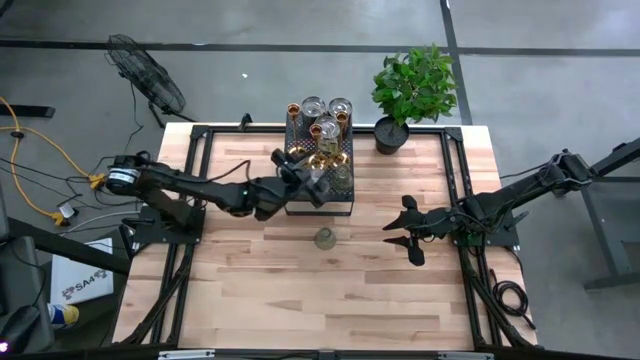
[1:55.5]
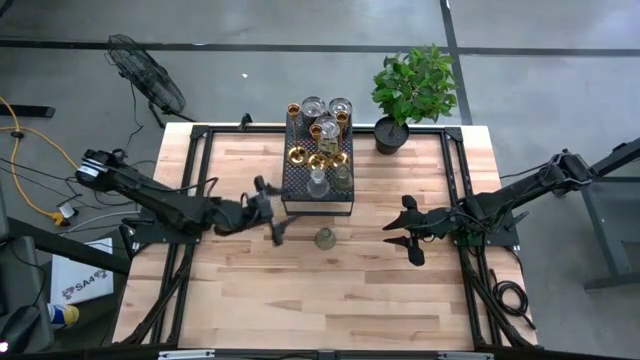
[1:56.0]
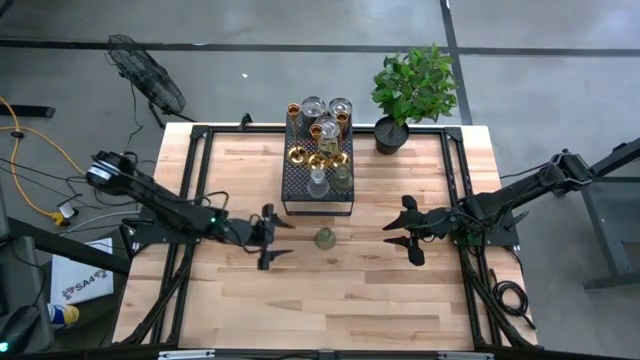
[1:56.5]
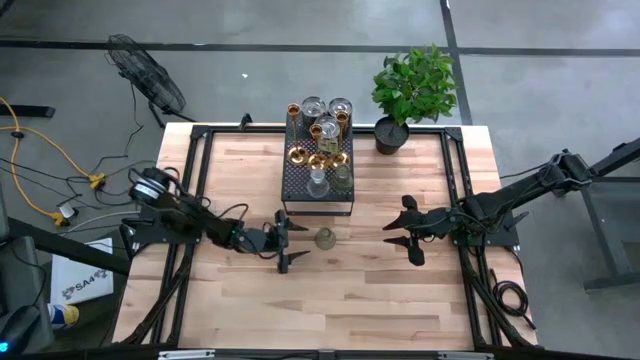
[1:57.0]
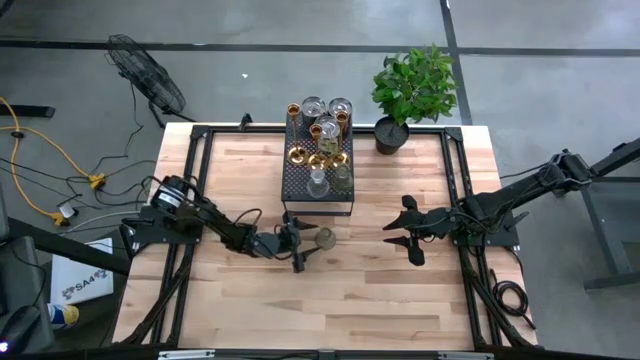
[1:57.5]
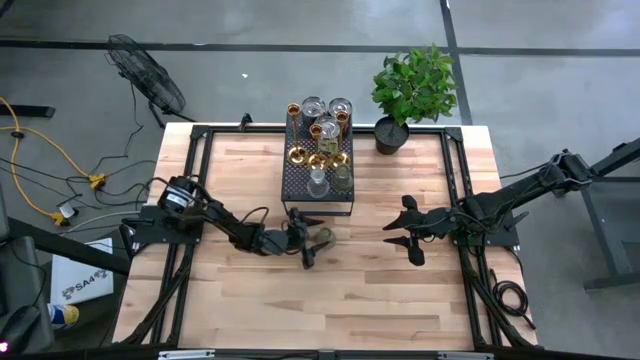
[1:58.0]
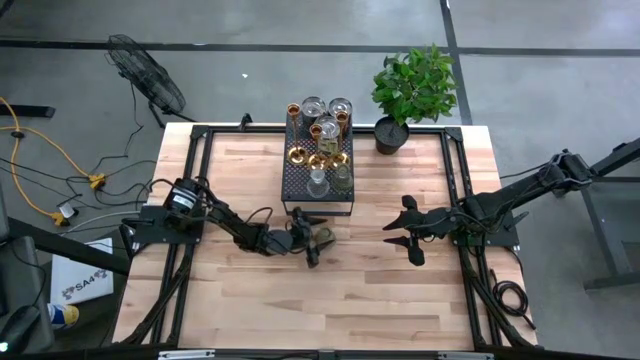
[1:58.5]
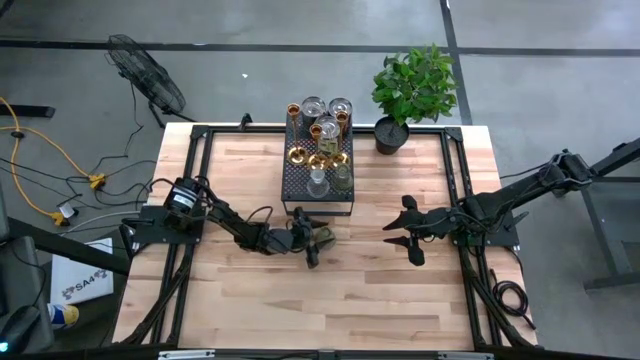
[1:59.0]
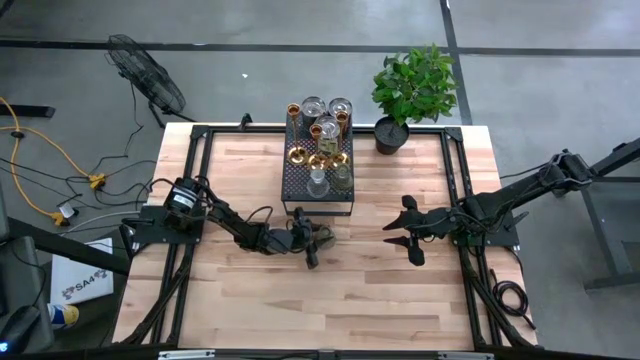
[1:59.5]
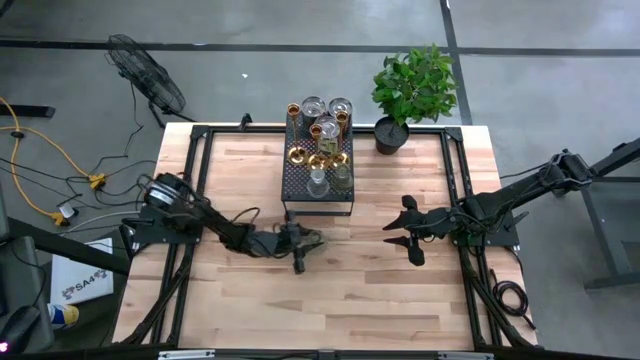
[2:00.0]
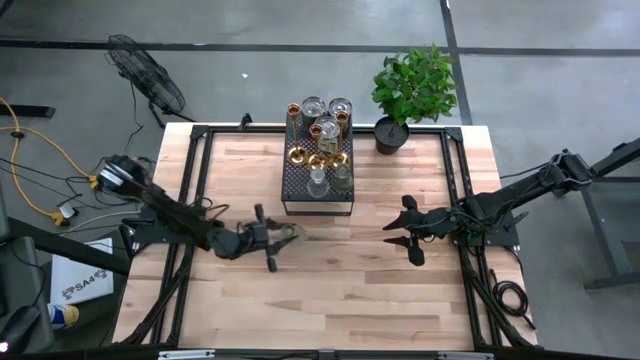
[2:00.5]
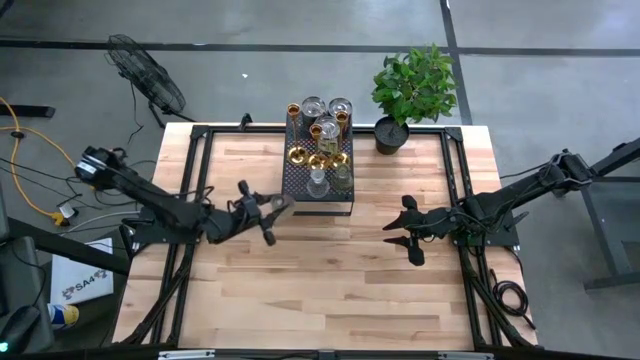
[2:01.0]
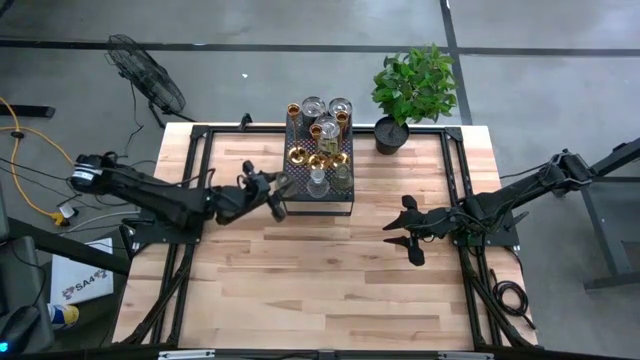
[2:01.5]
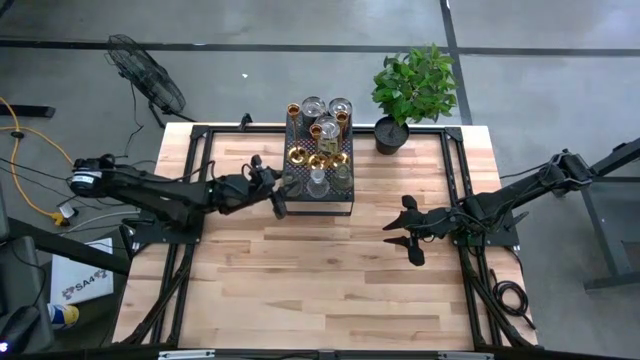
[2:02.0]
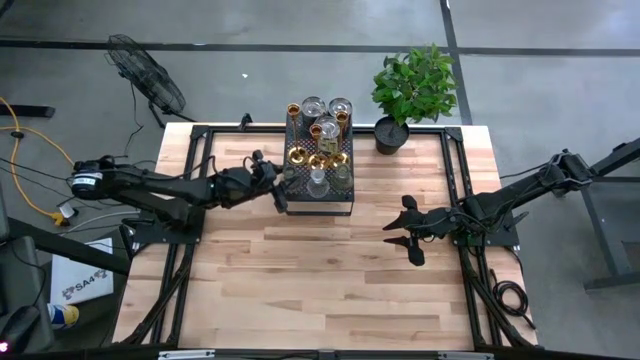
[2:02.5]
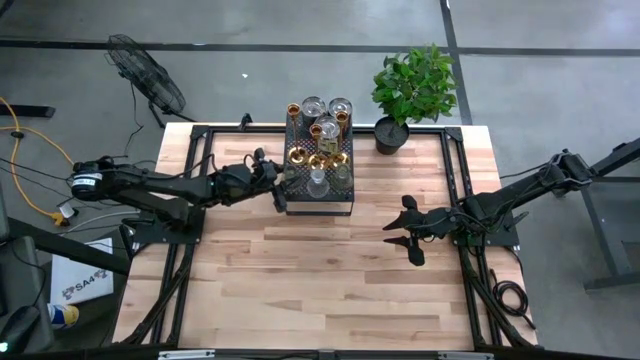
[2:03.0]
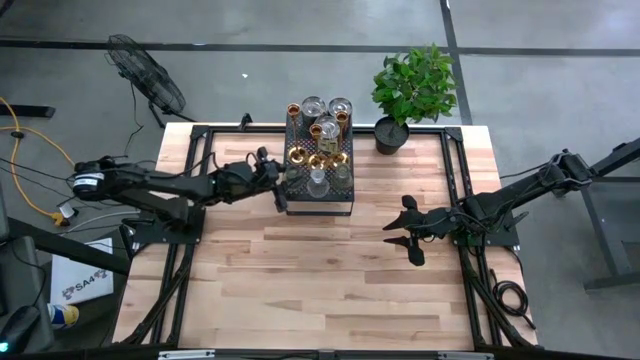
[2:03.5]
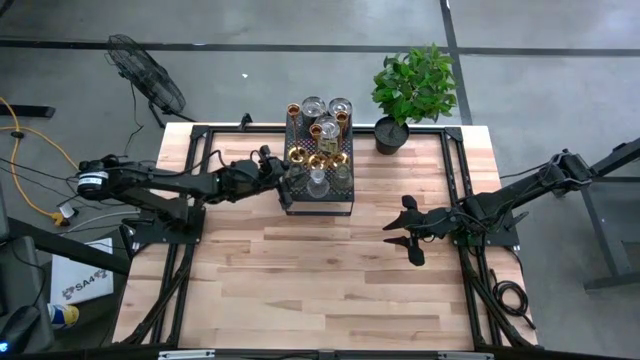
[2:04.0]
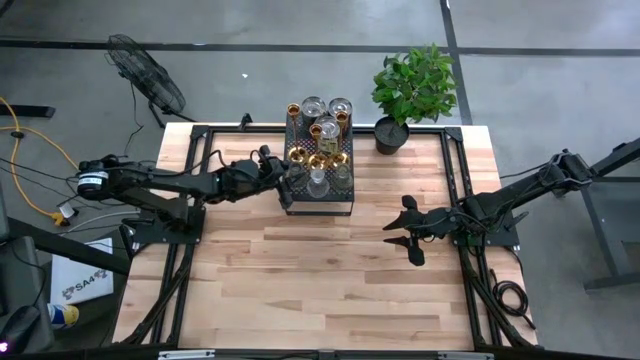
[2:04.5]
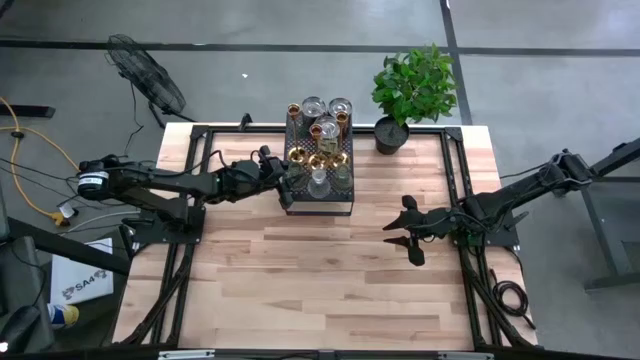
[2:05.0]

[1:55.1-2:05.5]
Task: Pick & Place candle stick holders
Put the green transparent candle holder on the shelf

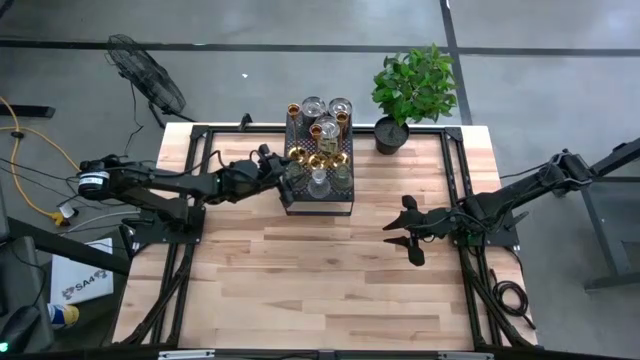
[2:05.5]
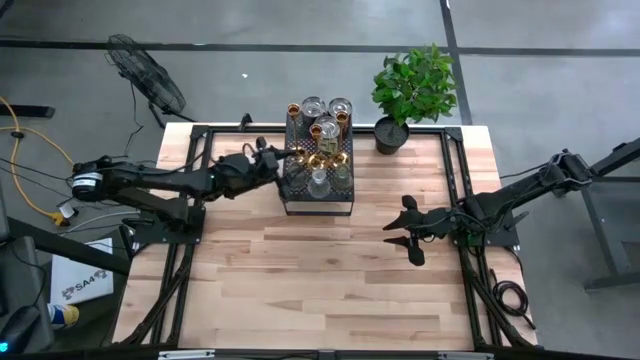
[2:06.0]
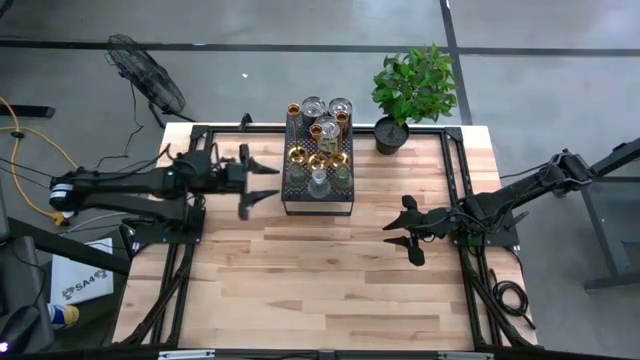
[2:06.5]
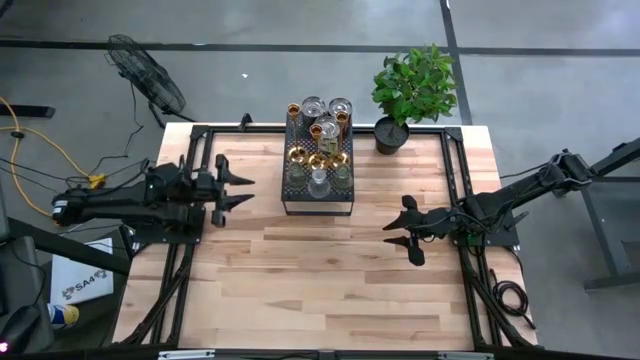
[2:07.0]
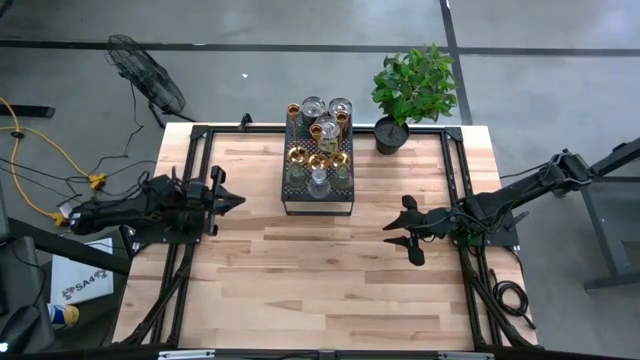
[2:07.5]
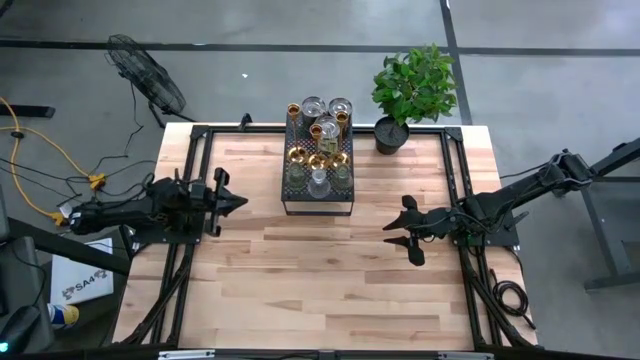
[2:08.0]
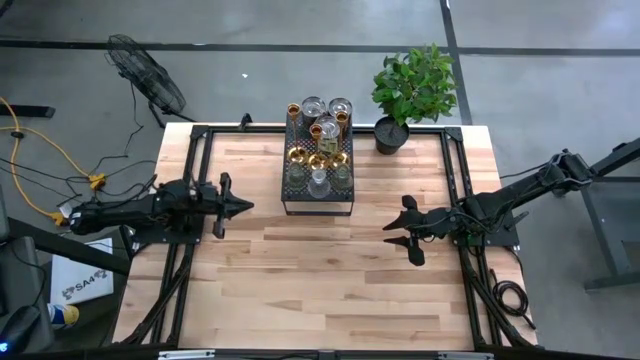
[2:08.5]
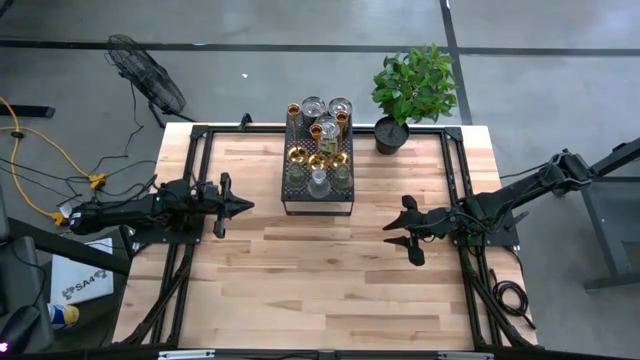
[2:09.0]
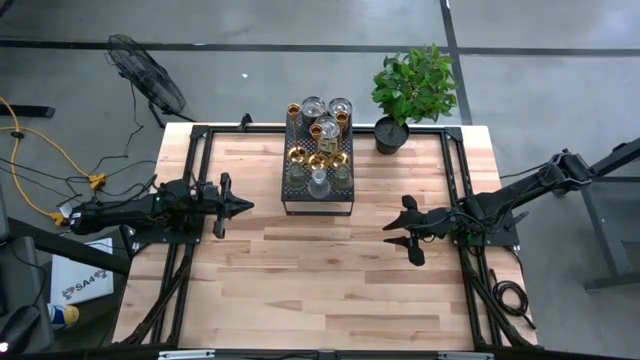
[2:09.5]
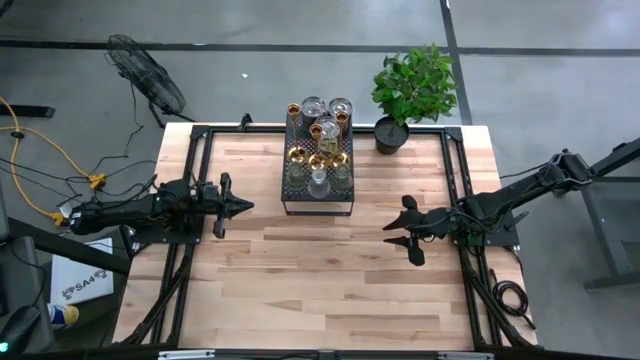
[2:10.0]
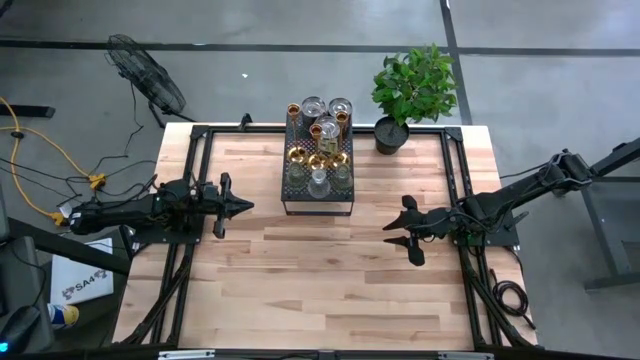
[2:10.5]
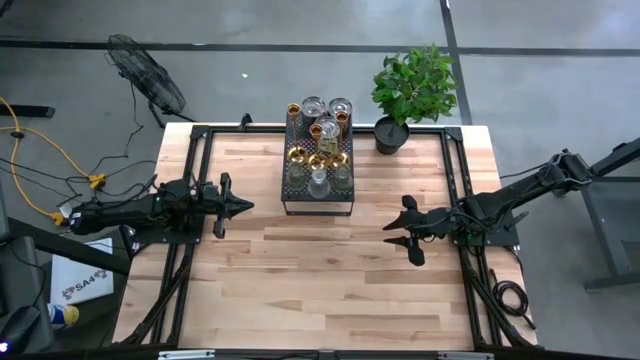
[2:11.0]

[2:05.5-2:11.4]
Return to Home Position

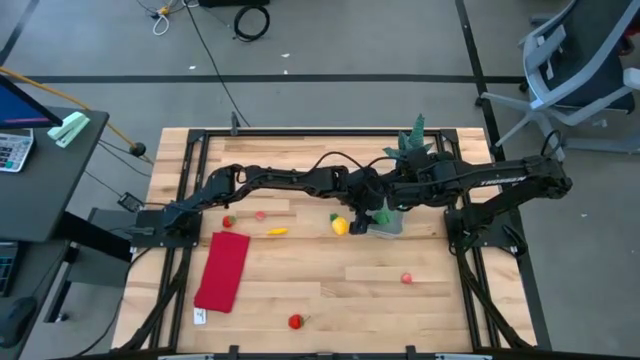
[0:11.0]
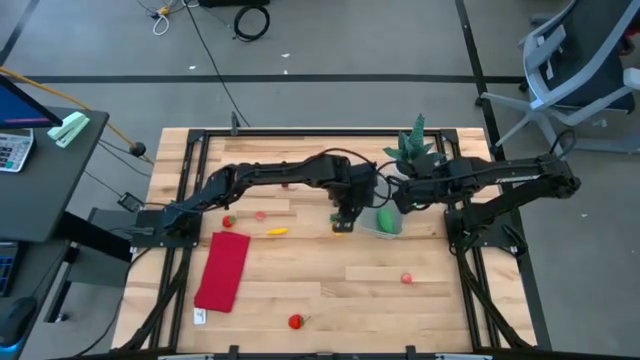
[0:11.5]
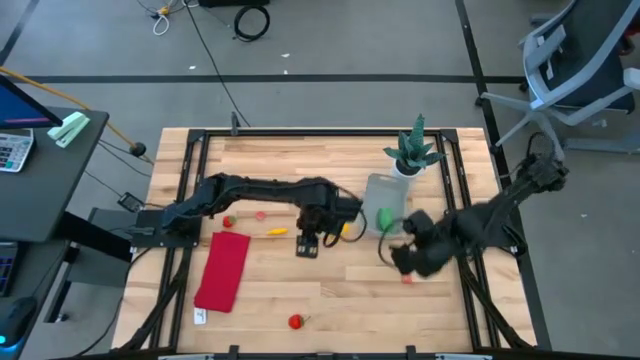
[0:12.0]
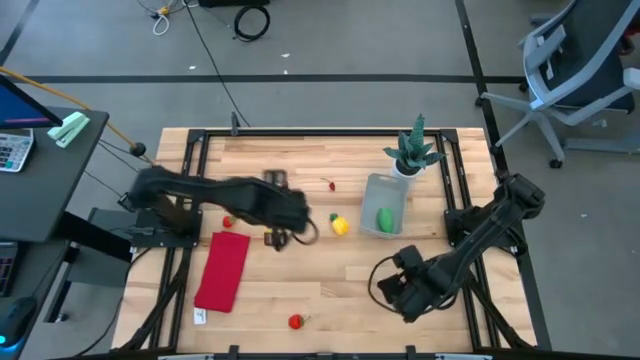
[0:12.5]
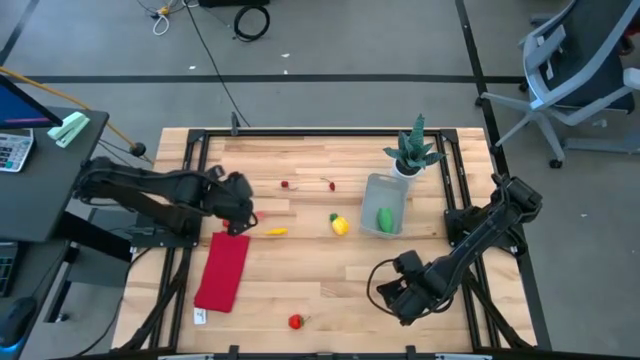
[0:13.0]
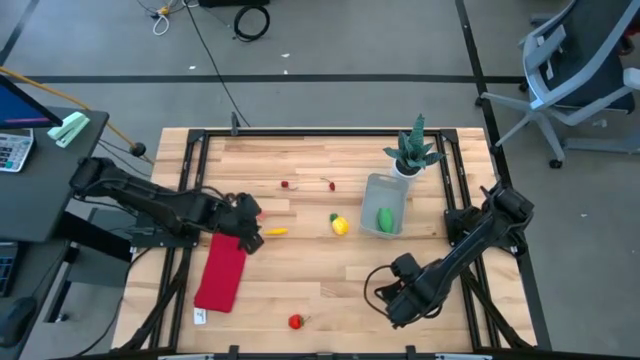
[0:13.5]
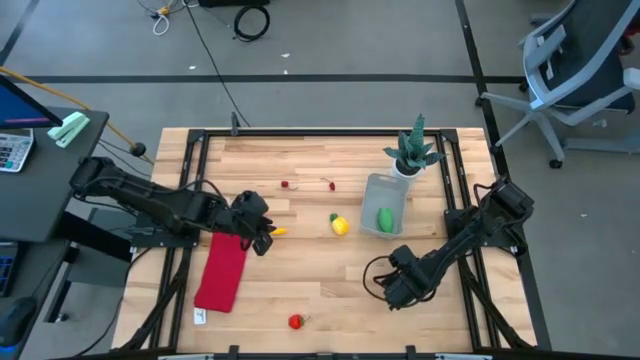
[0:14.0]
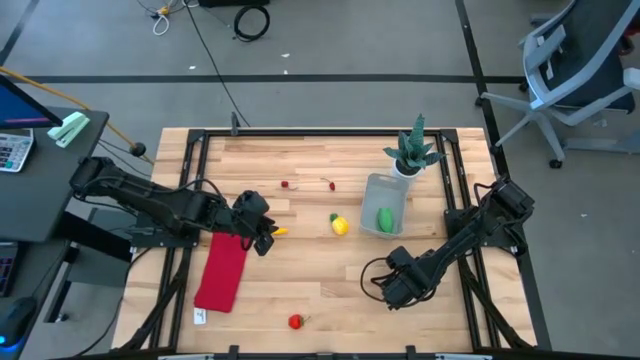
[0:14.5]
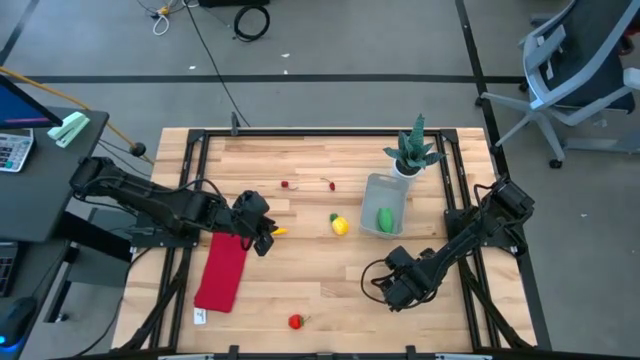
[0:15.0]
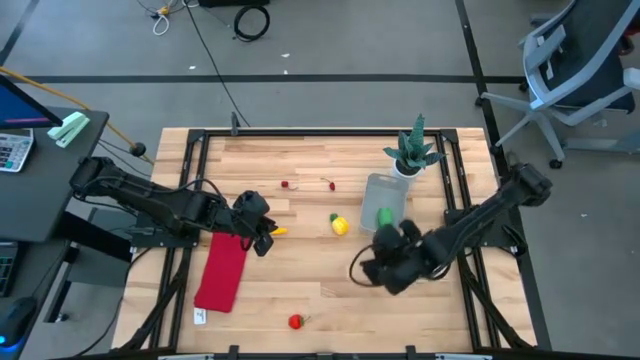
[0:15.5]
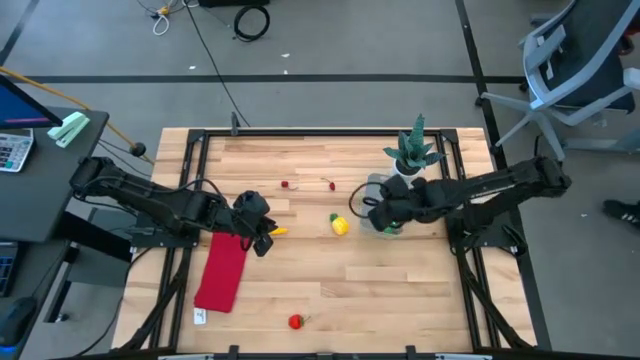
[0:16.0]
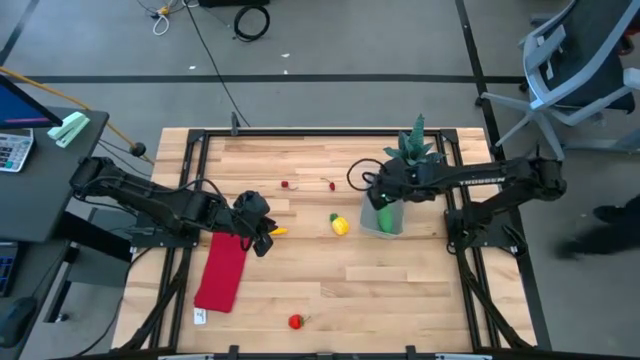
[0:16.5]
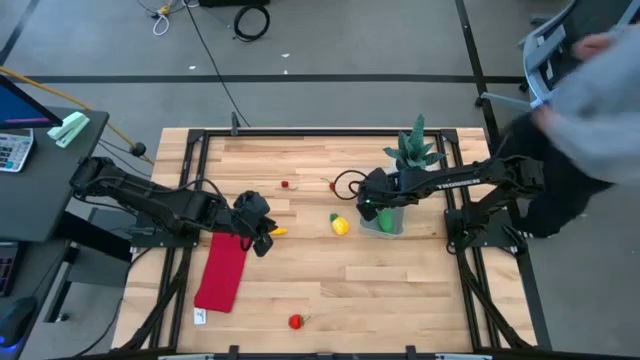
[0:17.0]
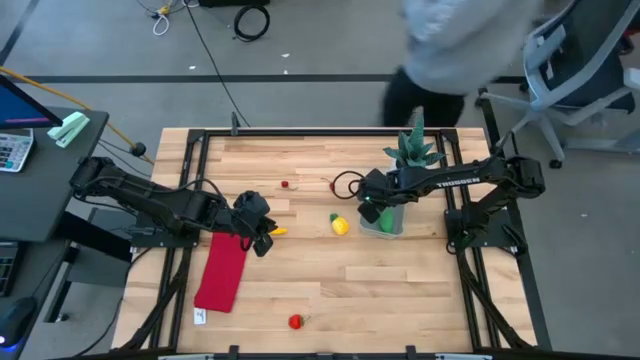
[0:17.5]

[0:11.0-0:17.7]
Task: Pick and placing Produce into tupperware
Put the right peach into the bin
